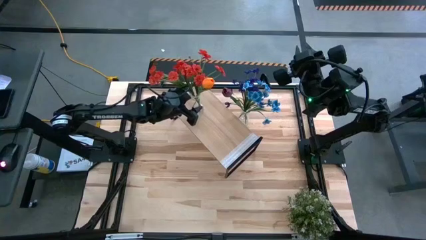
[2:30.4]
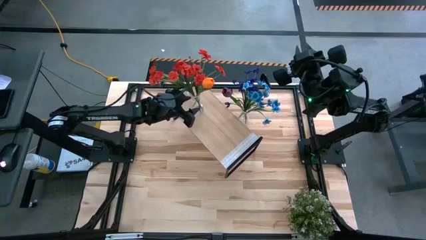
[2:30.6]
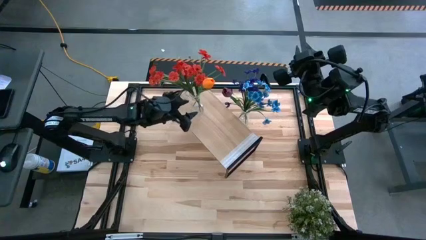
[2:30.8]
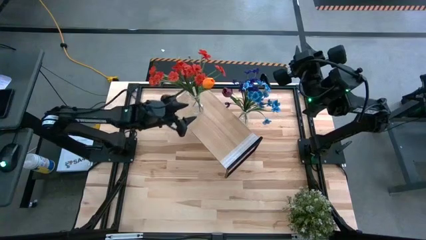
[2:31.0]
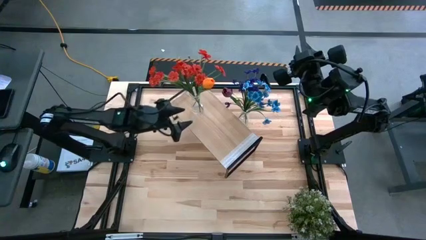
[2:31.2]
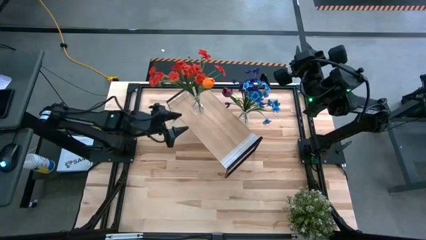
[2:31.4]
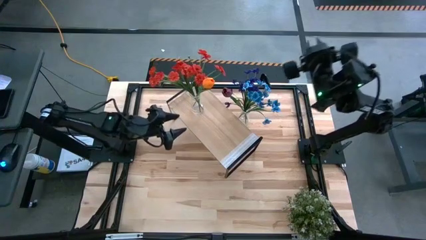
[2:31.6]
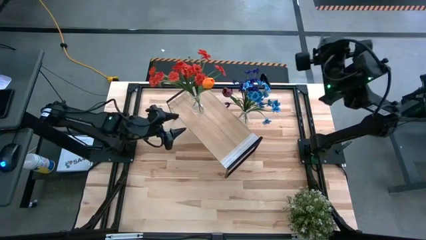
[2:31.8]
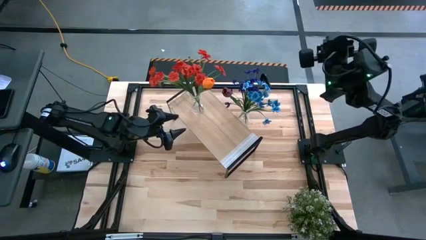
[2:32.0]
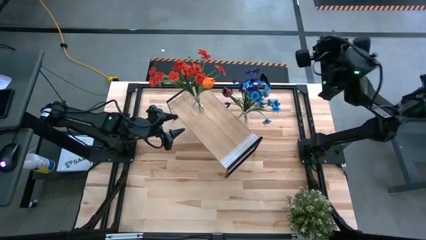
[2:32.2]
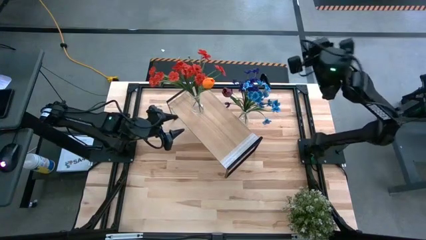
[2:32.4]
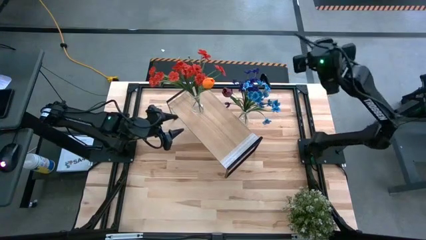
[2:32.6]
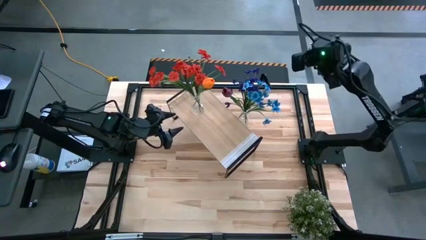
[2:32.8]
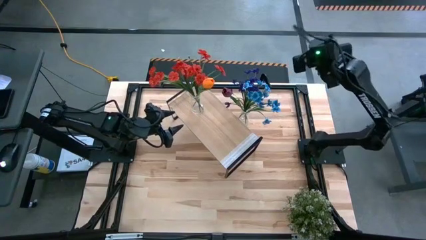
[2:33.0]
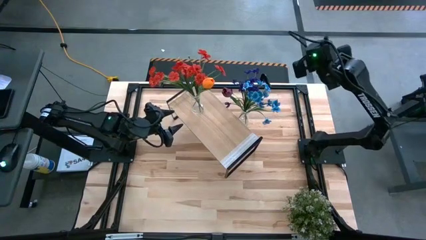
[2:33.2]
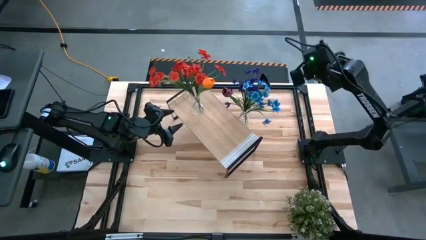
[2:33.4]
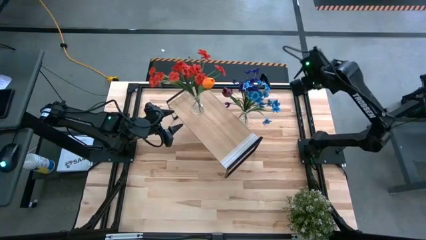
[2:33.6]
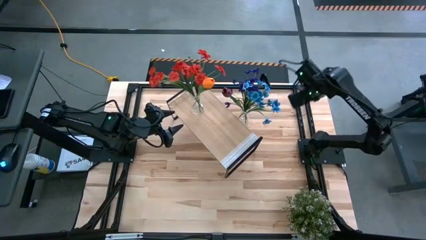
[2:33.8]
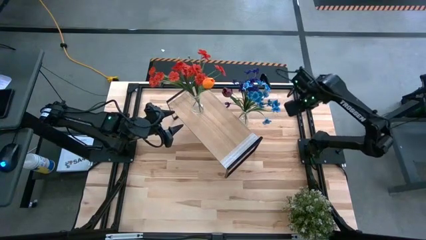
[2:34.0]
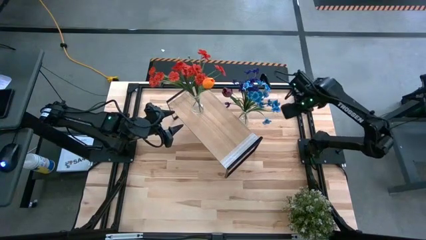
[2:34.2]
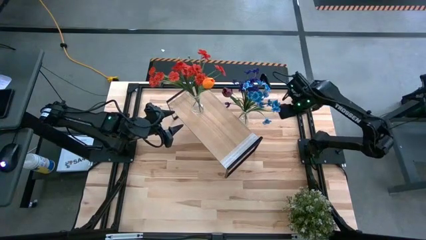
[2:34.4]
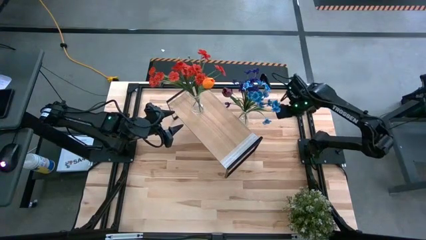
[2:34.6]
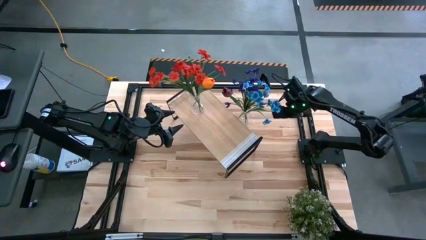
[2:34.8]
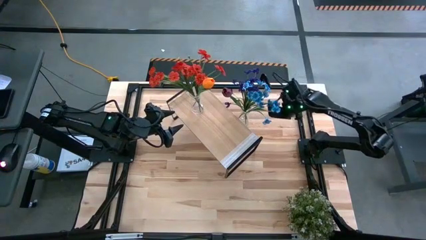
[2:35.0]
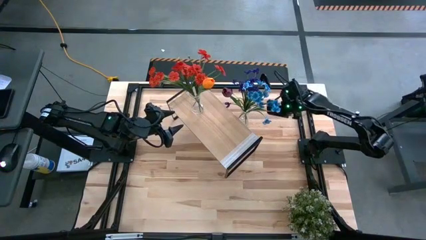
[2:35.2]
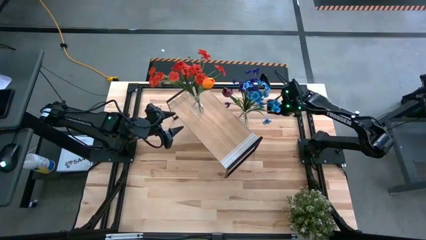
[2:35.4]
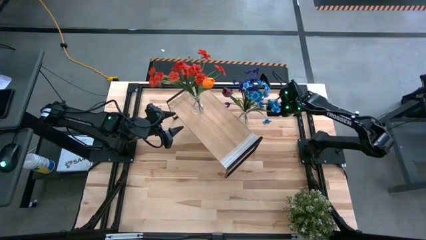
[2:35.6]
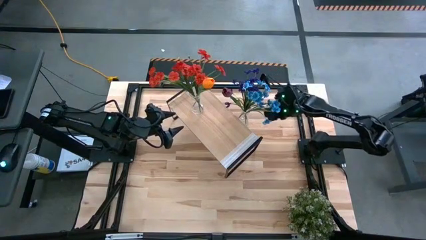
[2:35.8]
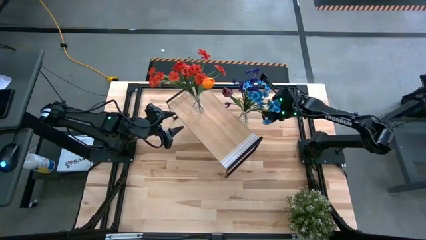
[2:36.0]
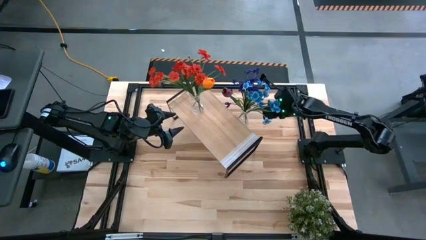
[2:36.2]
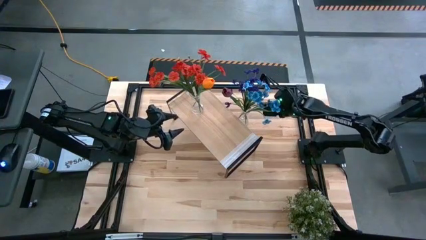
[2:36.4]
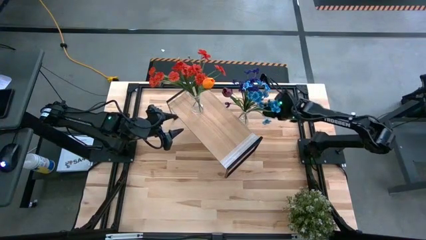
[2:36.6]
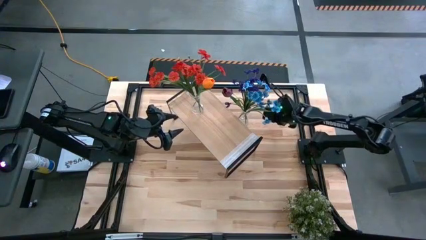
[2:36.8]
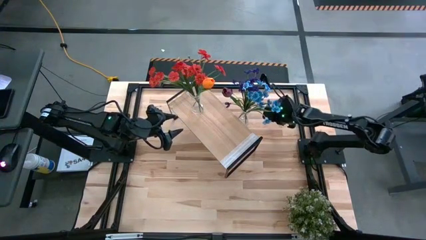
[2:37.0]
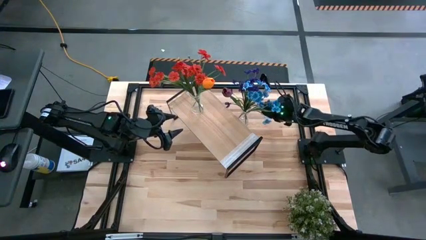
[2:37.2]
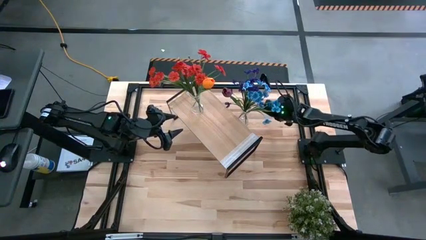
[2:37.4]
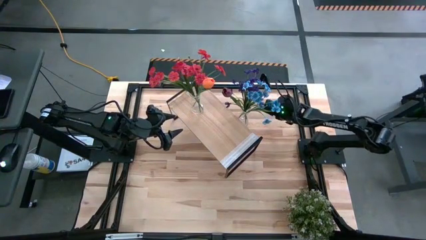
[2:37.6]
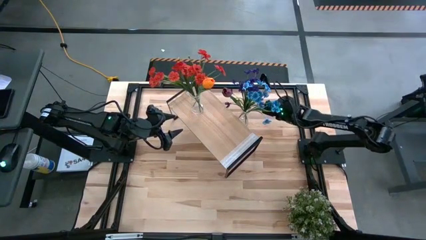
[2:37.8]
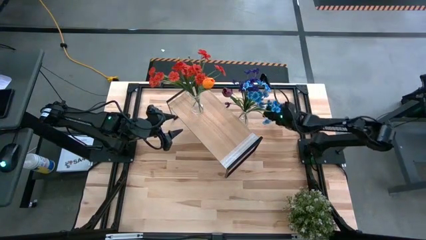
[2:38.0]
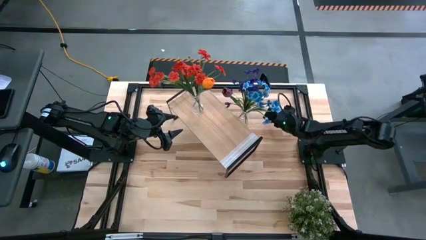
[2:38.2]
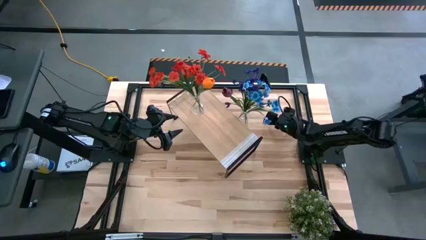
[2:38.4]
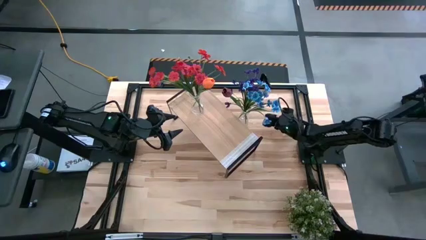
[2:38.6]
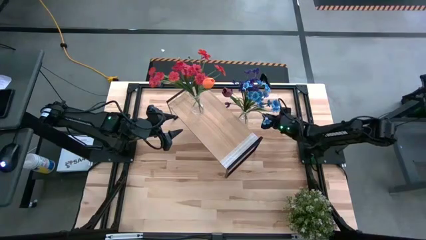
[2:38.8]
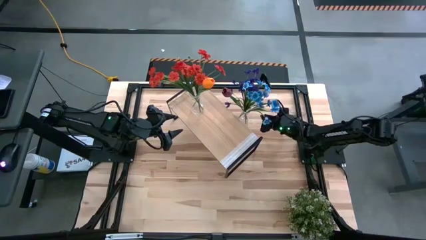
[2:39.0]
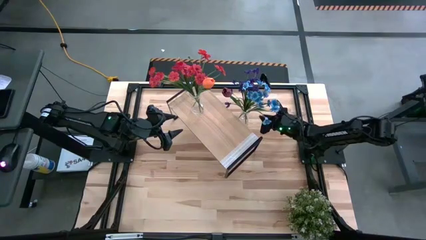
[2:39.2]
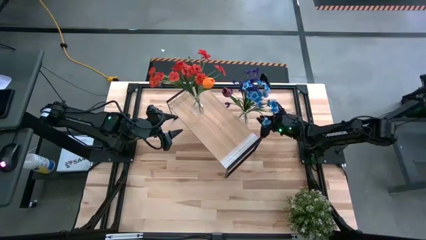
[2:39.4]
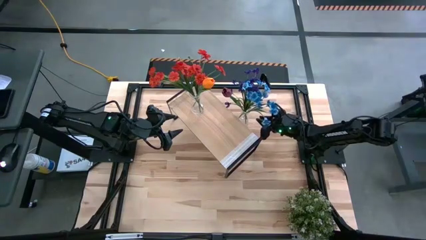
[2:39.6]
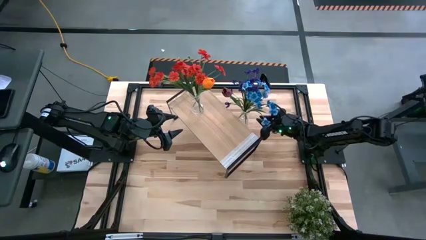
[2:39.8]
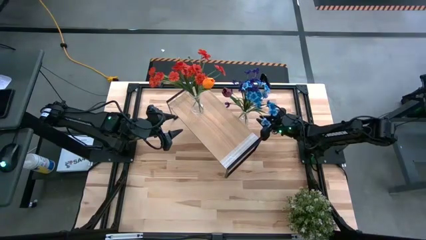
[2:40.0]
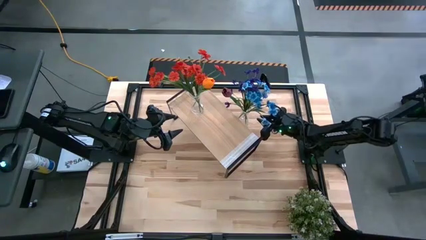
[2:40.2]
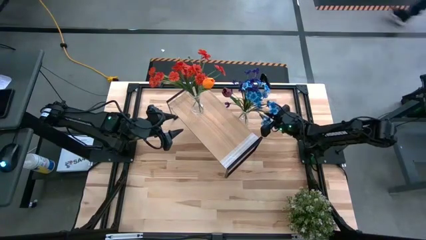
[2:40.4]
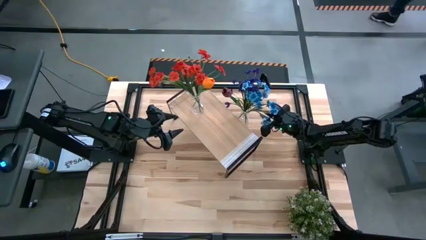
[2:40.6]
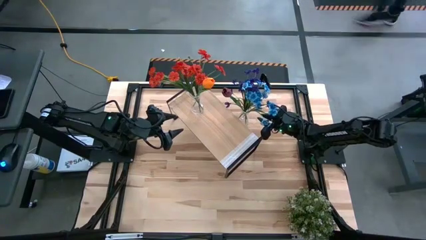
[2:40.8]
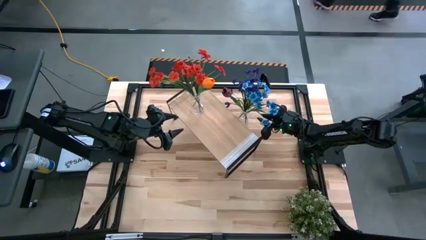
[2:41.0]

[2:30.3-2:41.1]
Task: Pick and place flowers into a vace then onto a shelf
Put the transparent vase with flowers on the shelf

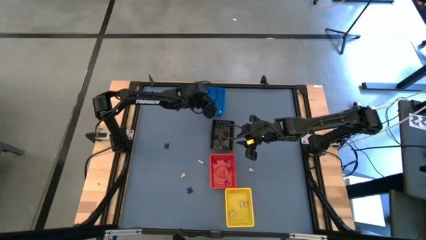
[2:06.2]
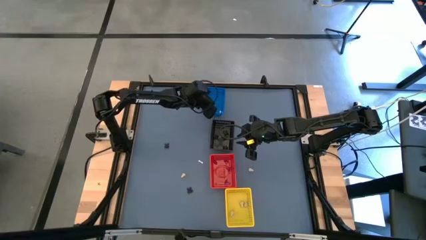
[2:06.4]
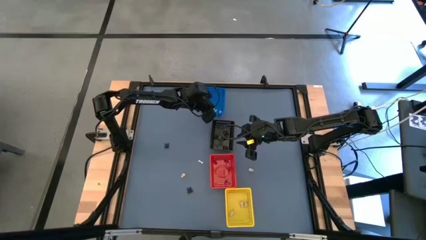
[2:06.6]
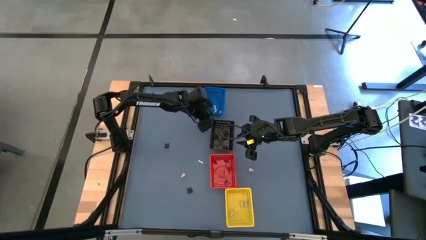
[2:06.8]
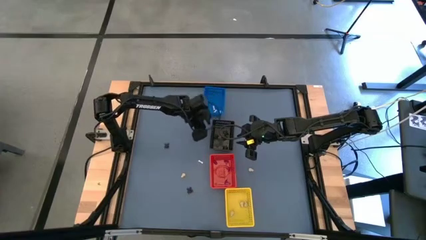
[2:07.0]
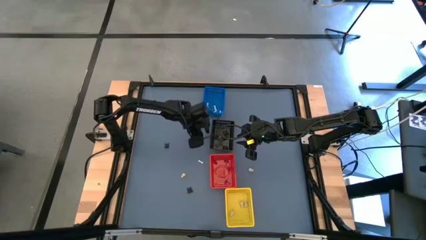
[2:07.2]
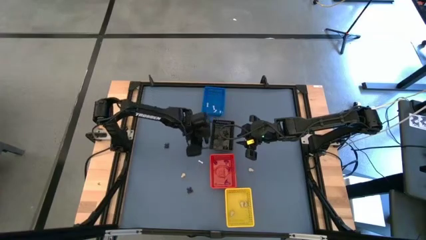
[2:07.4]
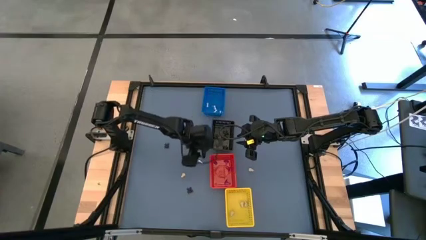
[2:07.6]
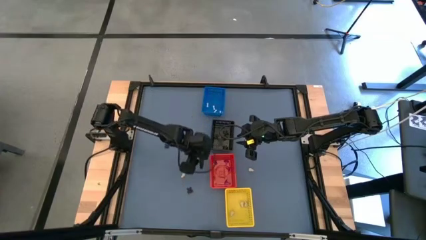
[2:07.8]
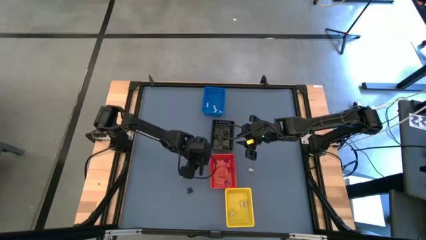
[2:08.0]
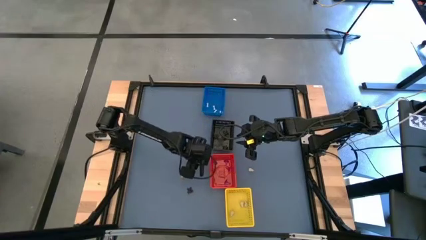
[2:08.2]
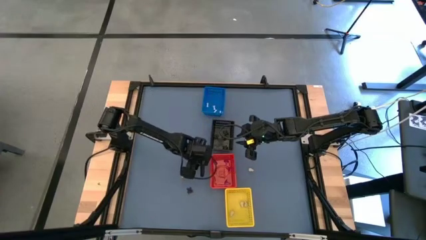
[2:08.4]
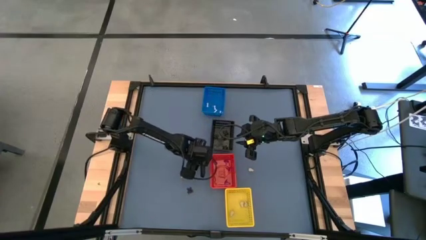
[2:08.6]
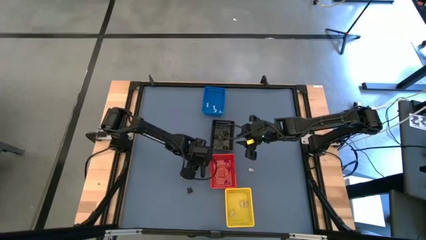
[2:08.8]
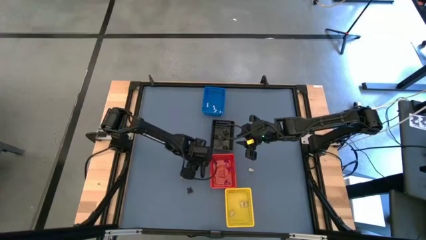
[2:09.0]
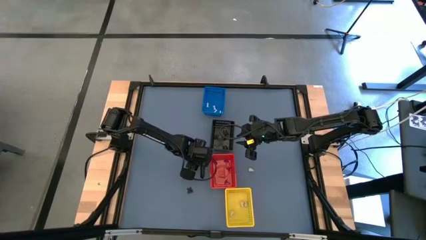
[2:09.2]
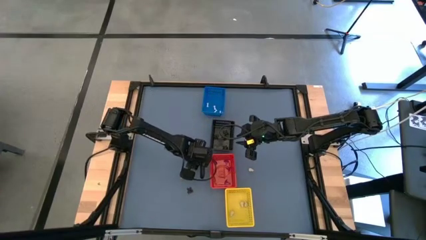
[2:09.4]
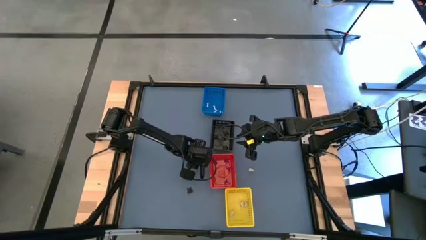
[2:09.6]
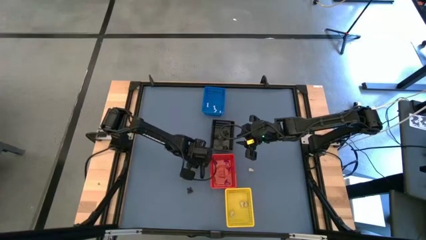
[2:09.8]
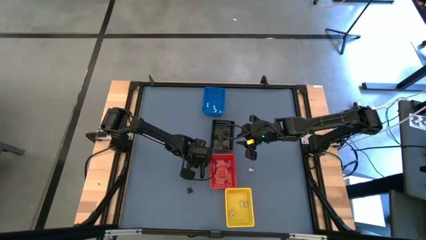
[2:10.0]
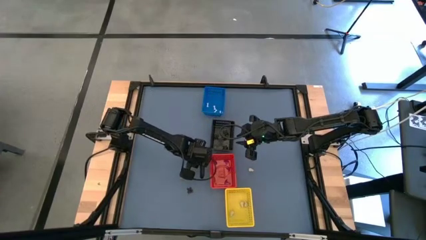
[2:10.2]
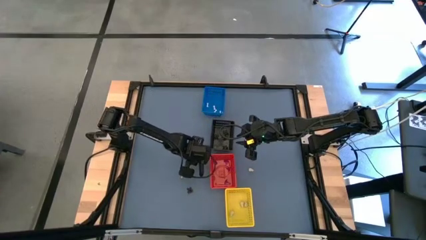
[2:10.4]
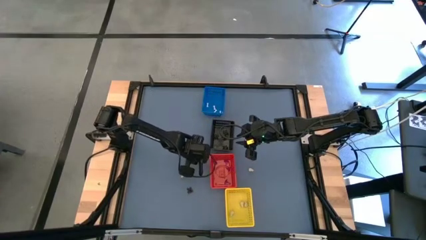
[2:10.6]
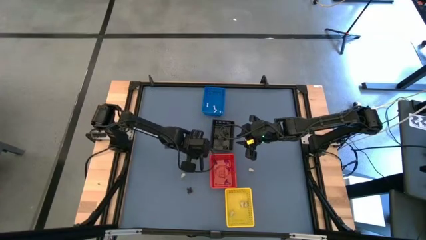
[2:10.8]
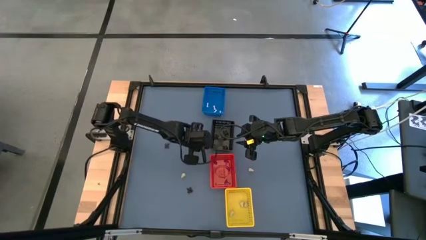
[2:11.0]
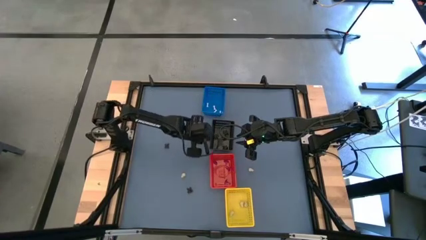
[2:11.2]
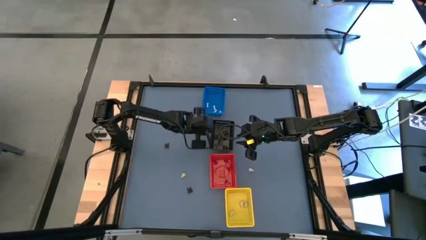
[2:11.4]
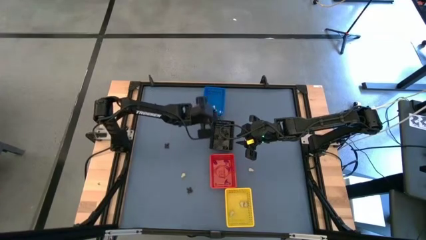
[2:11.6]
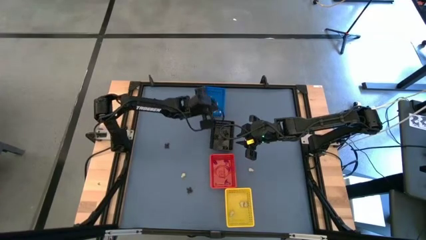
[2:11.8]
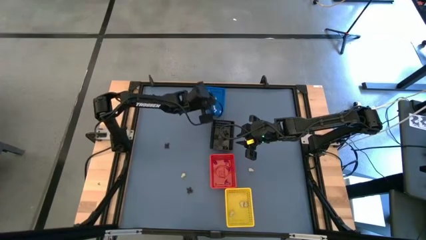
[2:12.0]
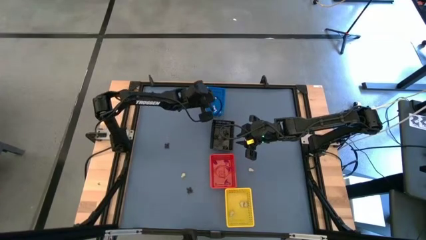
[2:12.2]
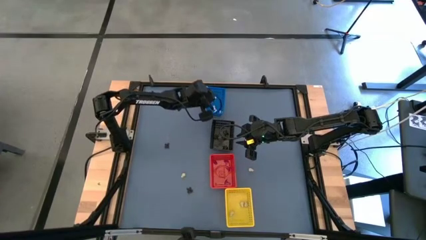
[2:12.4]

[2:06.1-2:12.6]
Task: Sort Halloween decoration
Put the white bone toy into the blue bin
